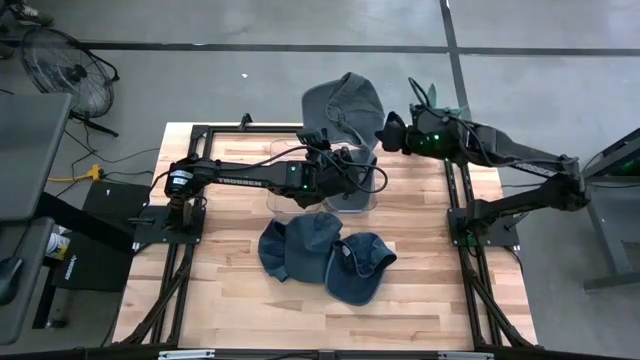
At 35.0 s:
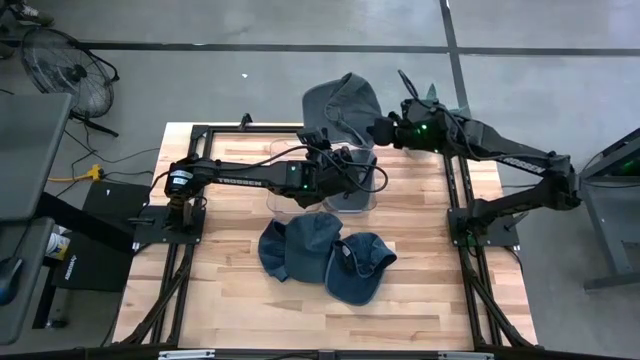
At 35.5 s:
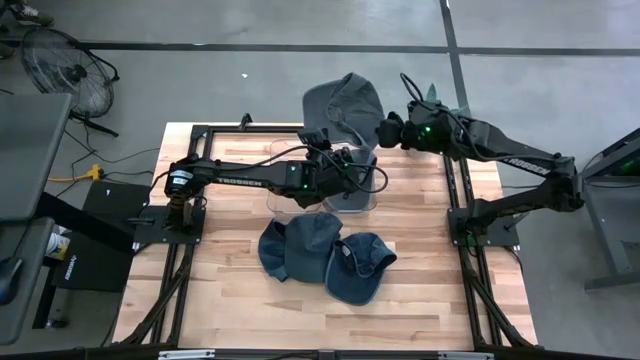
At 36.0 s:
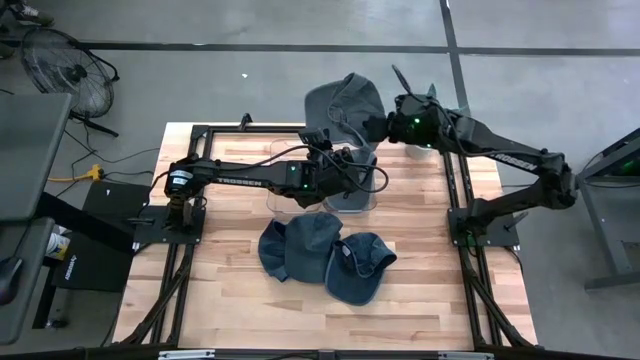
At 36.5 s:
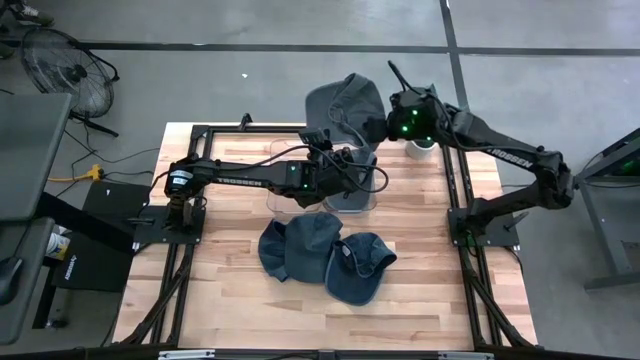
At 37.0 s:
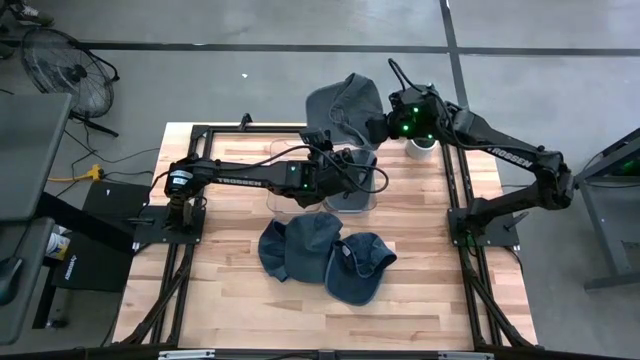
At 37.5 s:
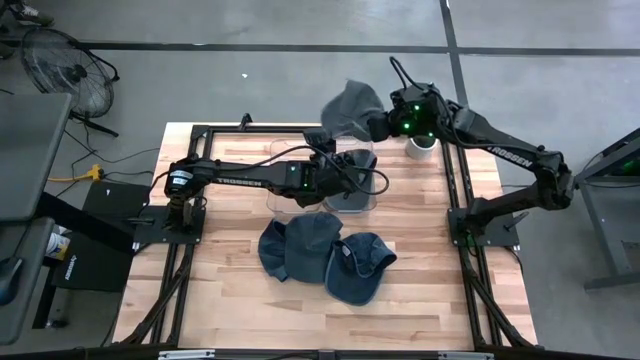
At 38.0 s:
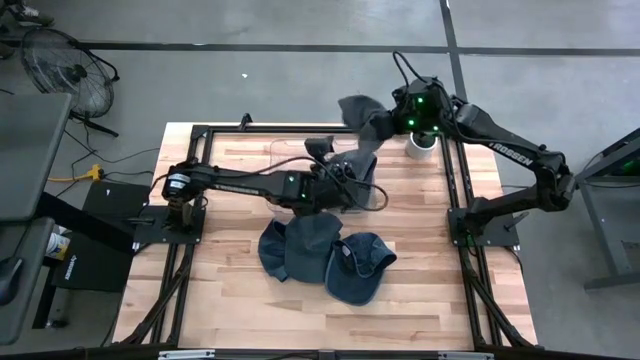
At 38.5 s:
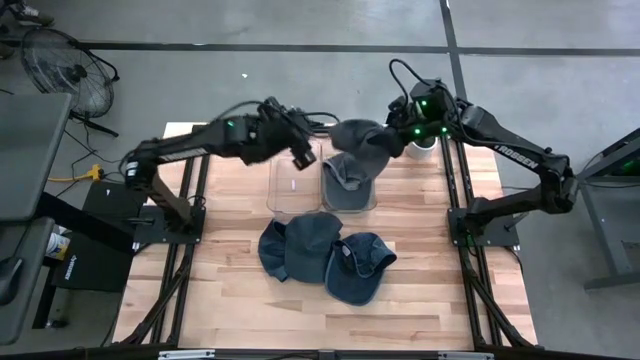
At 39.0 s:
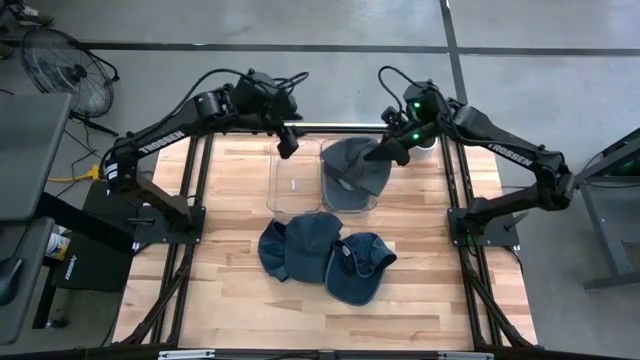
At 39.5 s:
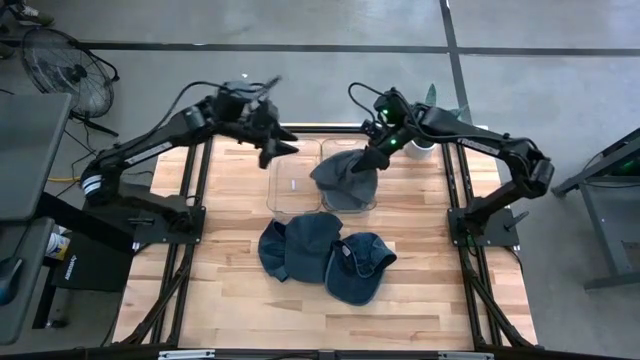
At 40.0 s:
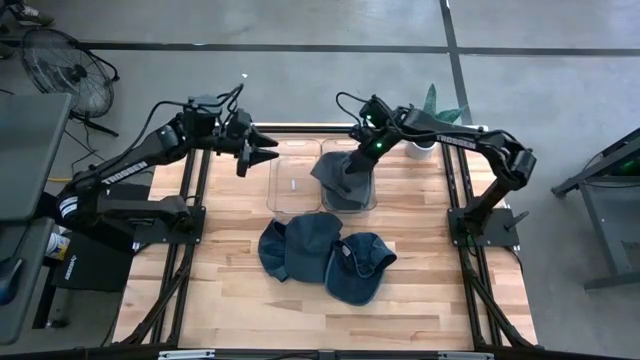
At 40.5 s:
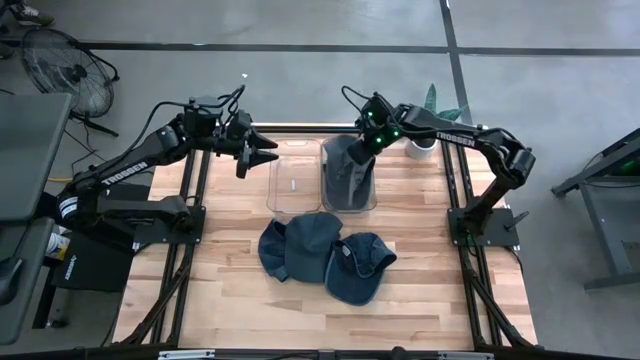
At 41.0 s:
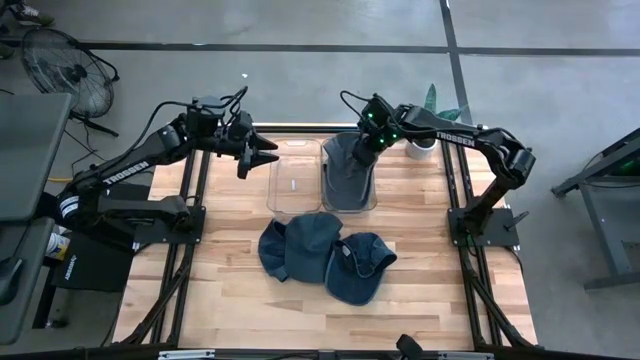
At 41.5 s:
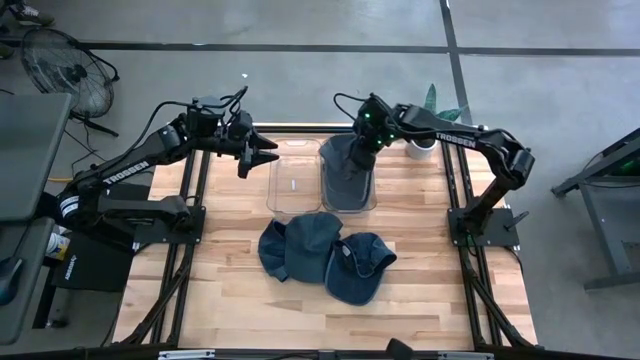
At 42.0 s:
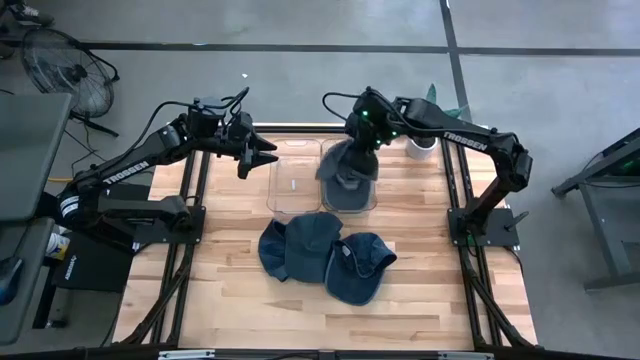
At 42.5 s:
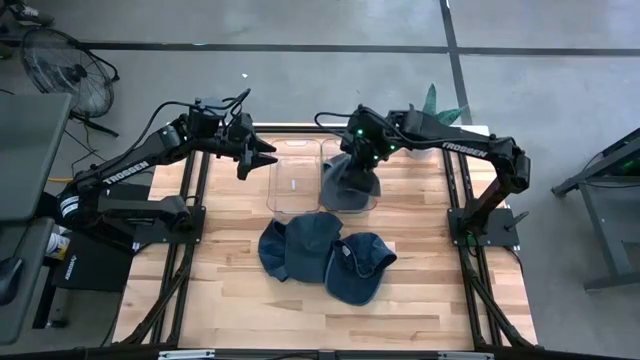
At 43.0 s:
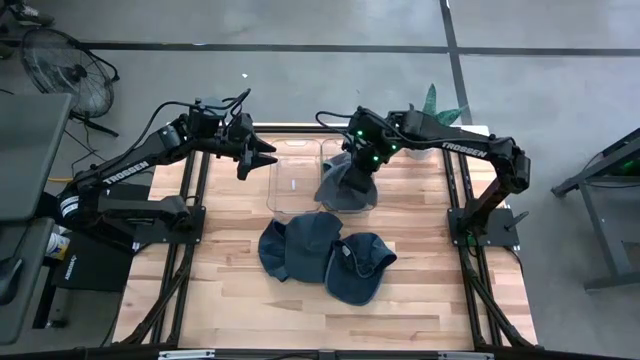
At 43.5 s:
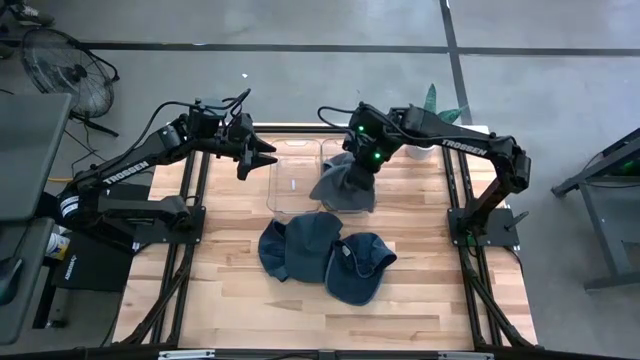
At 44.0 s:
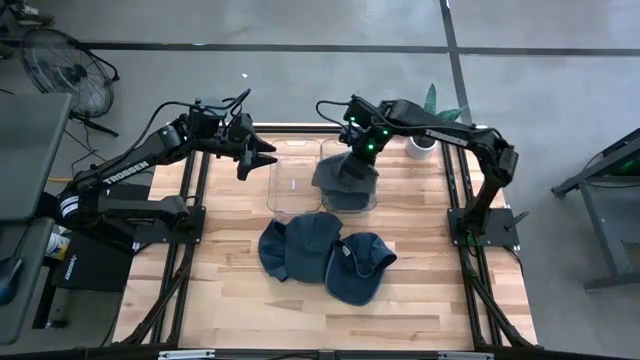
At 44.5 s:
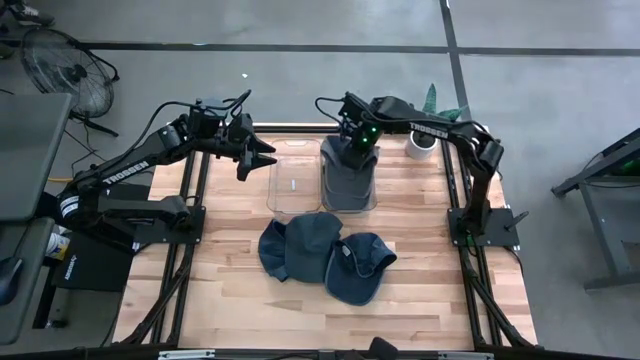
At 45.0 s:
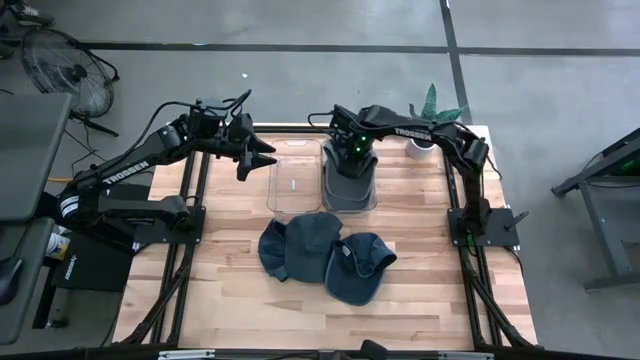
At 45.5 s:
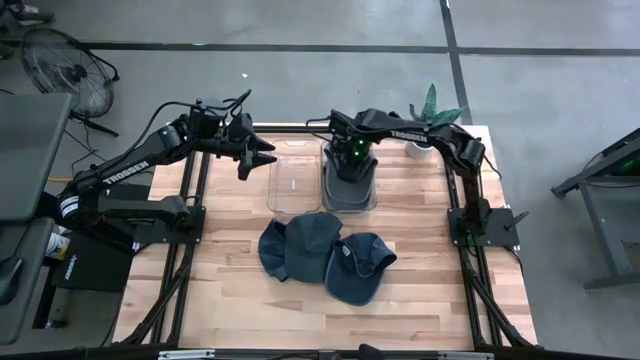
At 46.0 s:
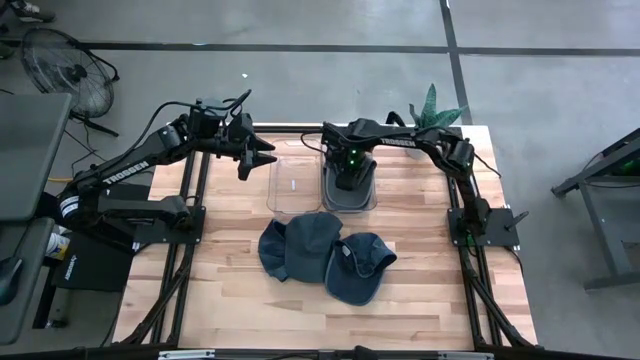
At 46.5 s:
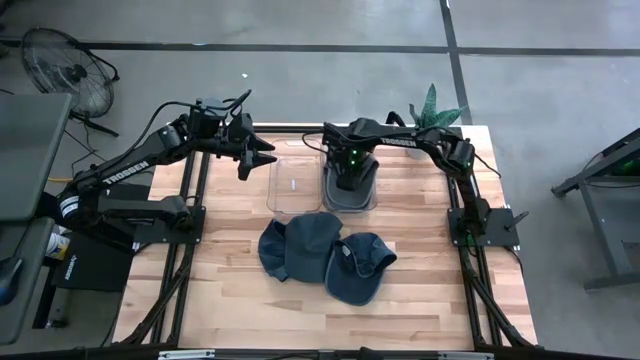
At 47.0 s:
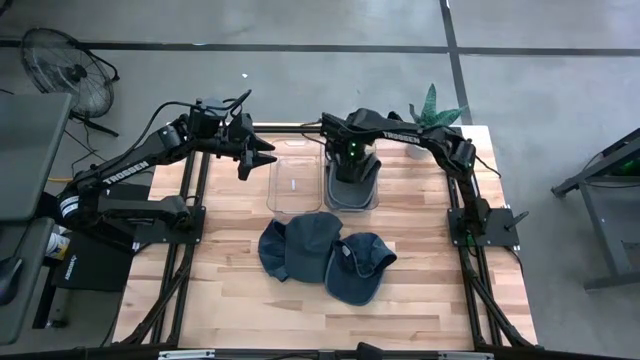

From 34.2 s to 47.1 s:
Task: Pick & Place hat
Put the gray cap into the right transparent bin

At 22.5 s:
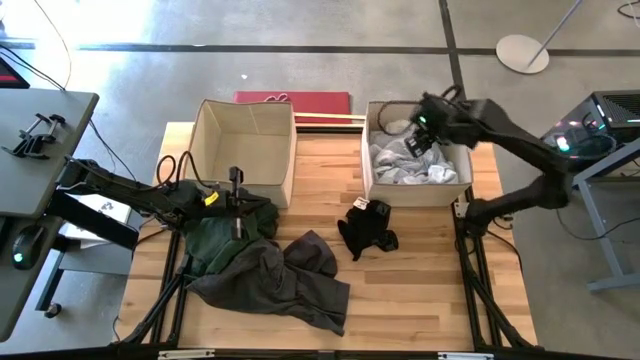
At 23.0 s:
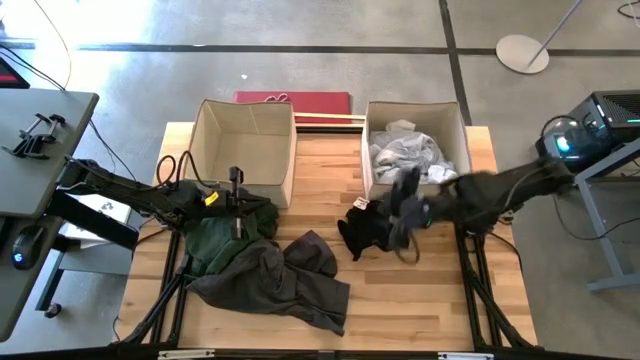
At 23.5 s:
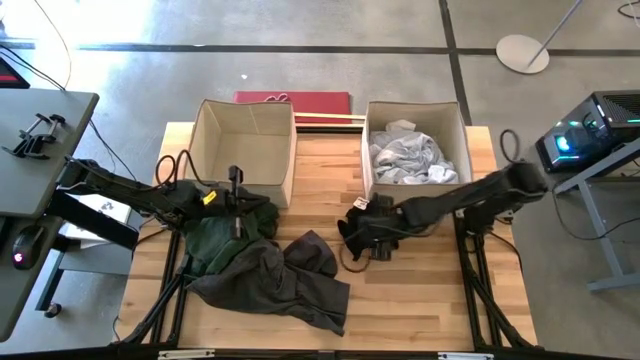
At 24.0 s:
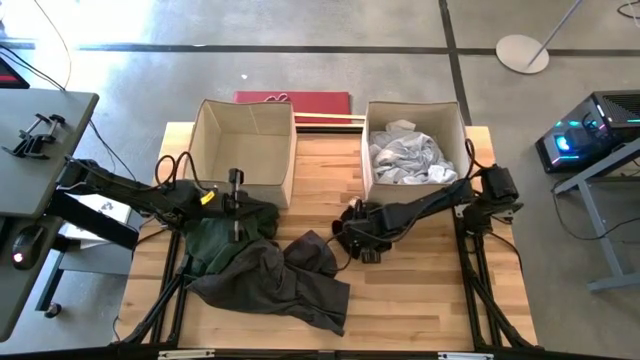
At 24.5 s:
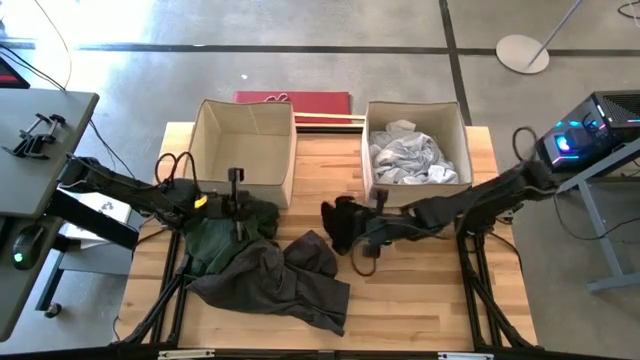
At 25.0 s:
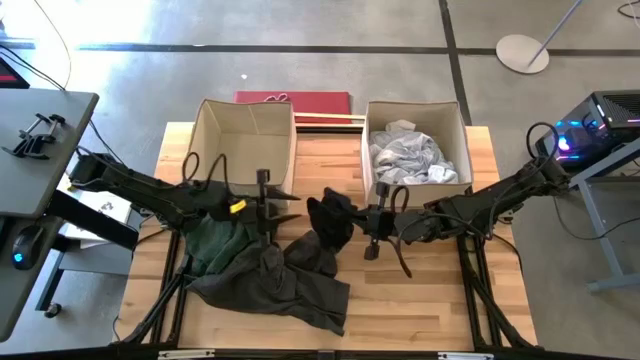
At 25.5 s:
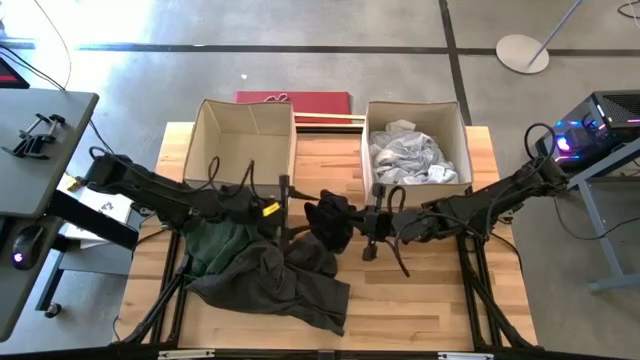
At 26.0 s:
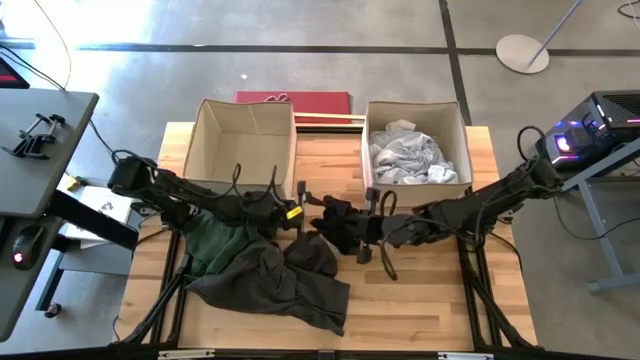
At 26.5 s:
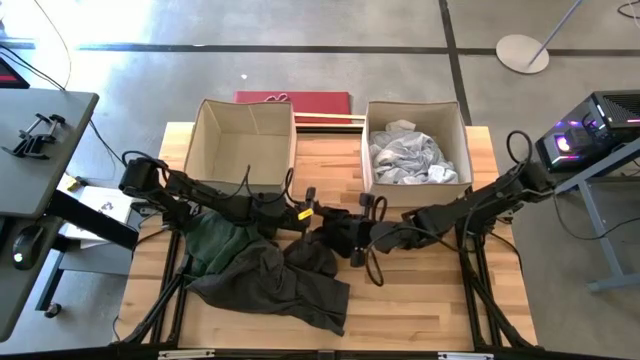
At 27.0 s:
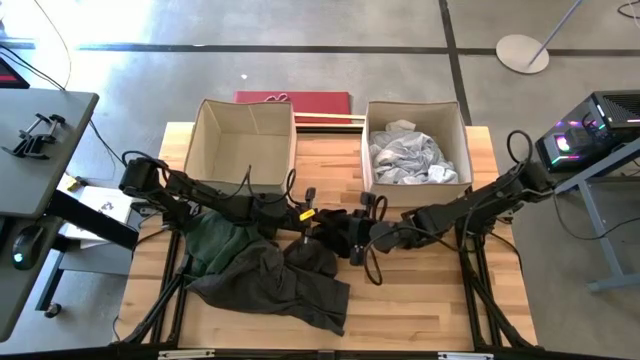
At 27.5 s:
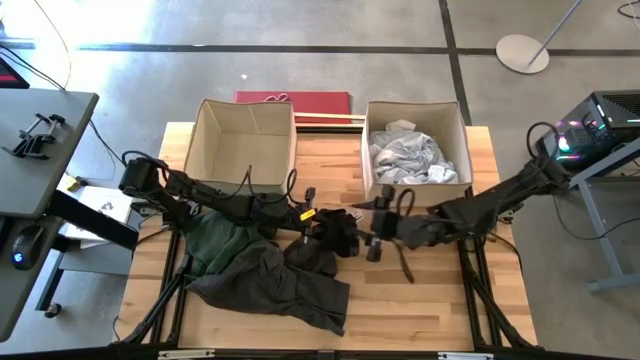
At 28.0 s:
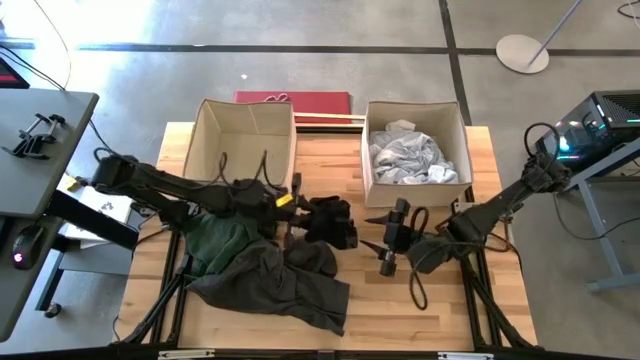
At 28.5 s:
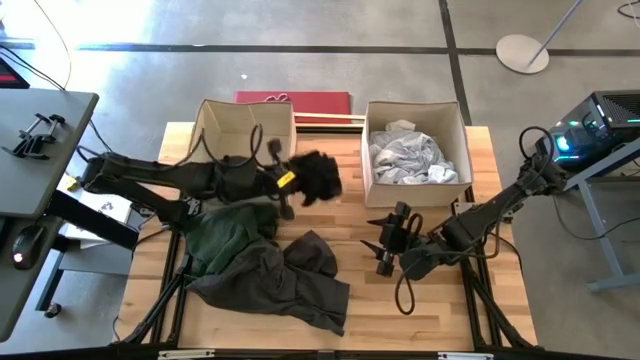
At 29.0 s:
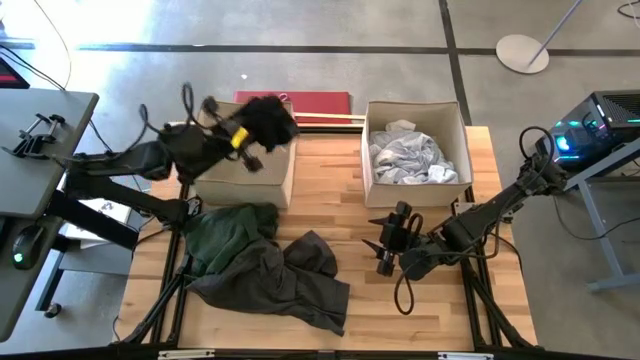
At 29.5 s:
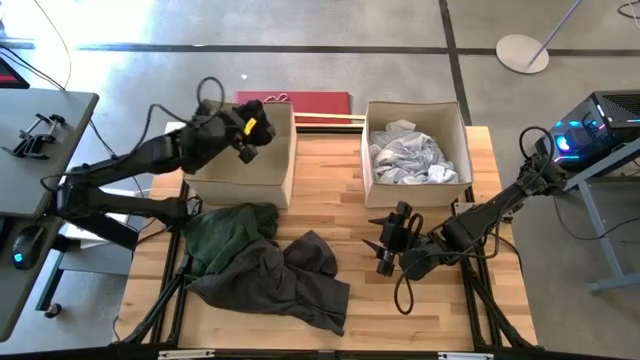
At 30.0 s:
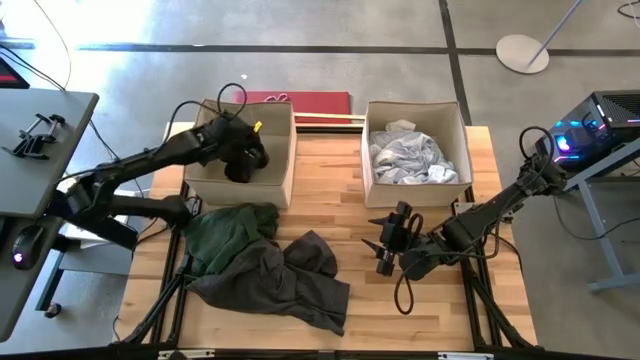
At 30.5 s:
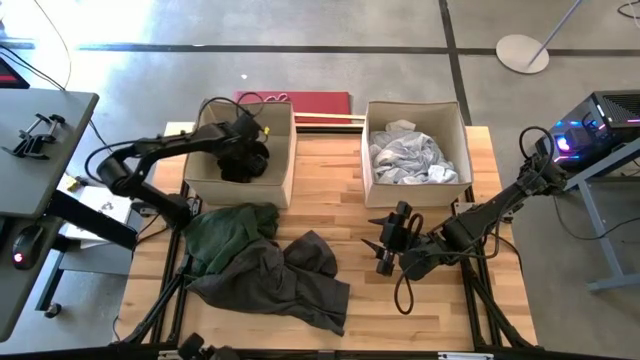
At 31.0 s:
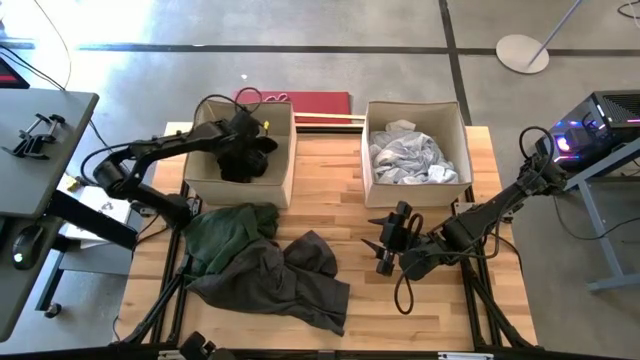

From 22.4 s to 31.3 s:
Task: Sort clothes
Put the black shorts into the left brown laundry bin
